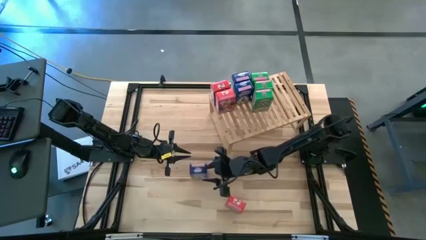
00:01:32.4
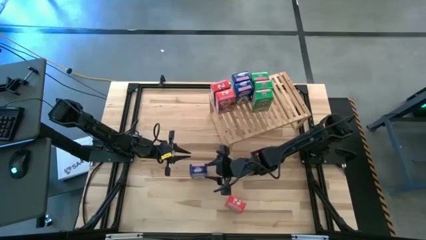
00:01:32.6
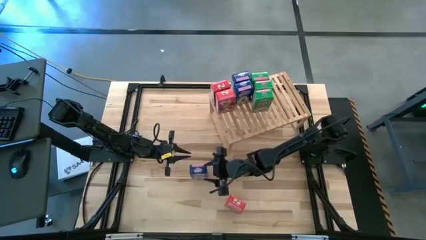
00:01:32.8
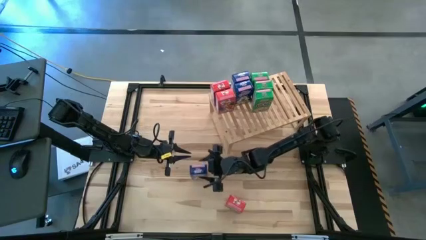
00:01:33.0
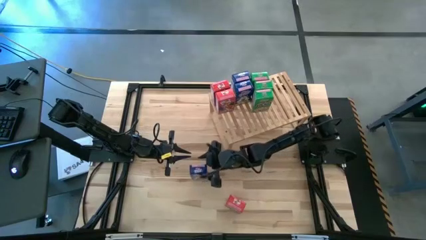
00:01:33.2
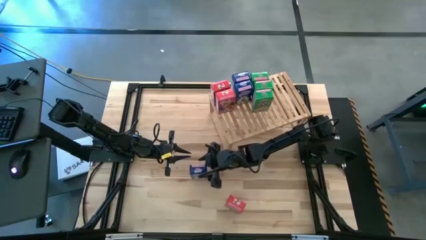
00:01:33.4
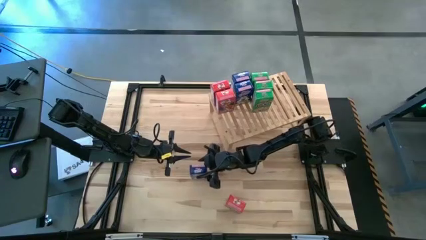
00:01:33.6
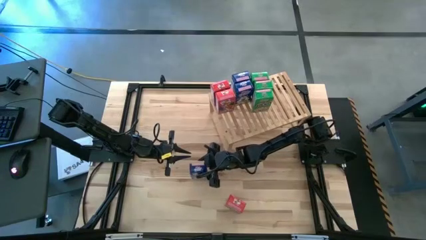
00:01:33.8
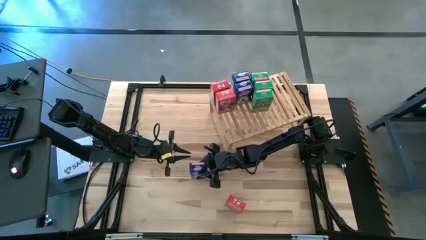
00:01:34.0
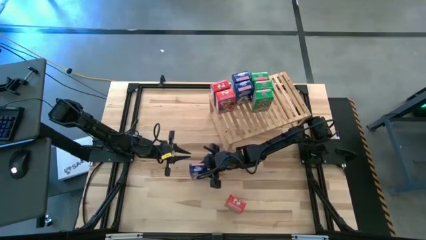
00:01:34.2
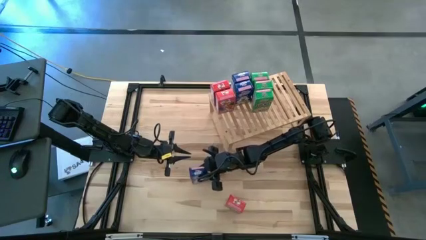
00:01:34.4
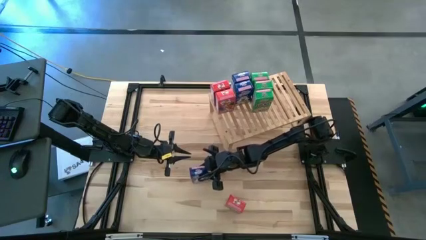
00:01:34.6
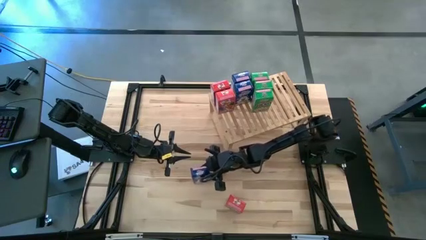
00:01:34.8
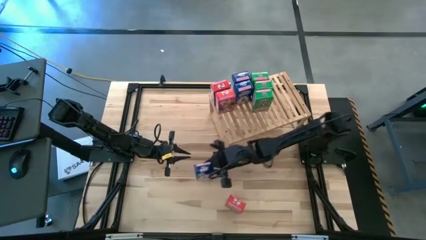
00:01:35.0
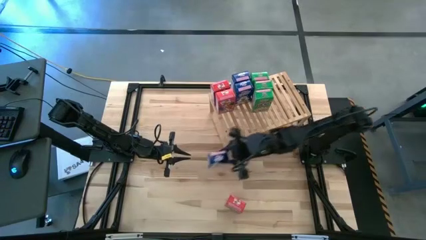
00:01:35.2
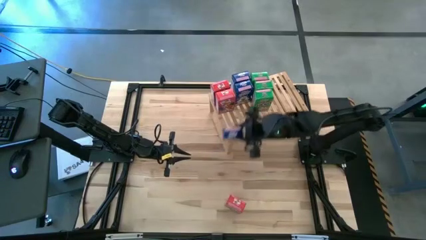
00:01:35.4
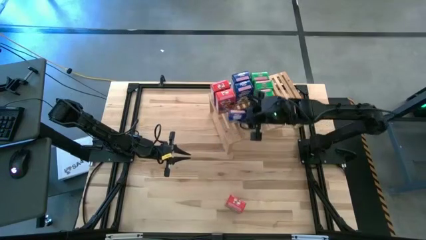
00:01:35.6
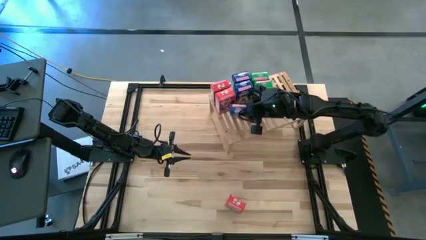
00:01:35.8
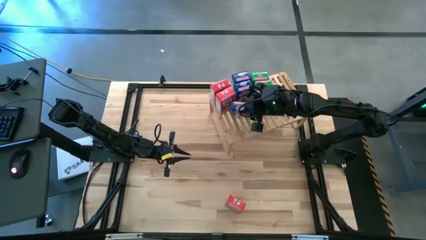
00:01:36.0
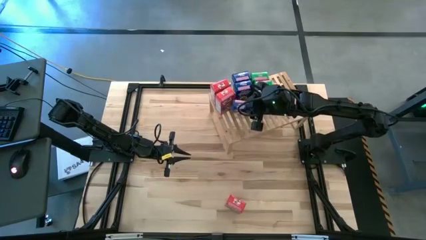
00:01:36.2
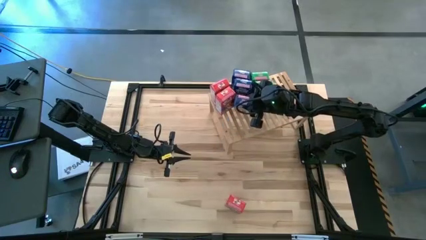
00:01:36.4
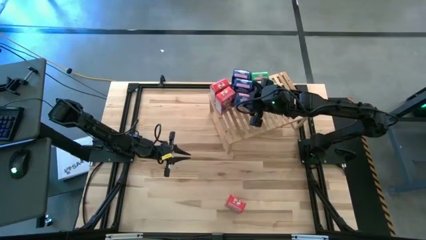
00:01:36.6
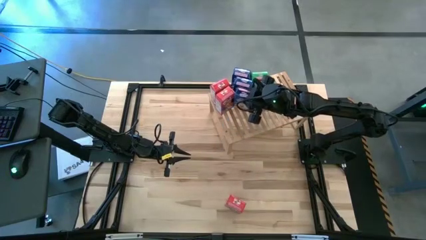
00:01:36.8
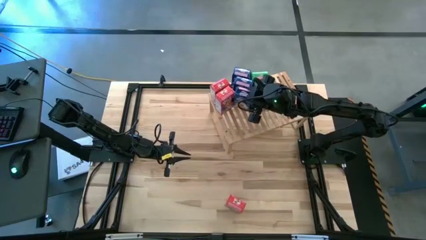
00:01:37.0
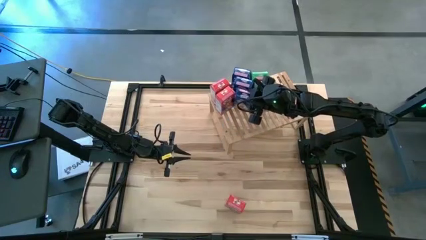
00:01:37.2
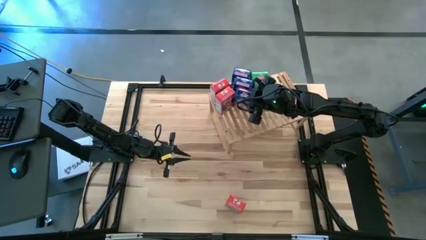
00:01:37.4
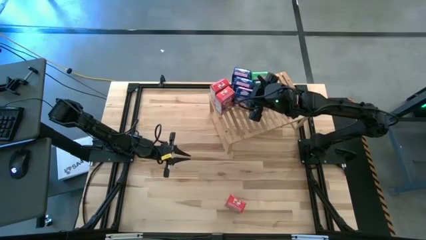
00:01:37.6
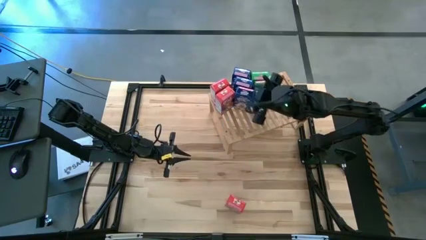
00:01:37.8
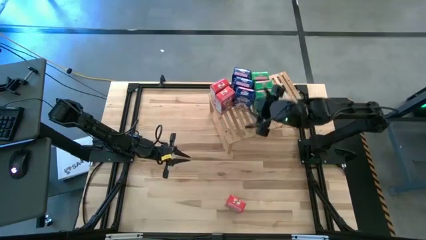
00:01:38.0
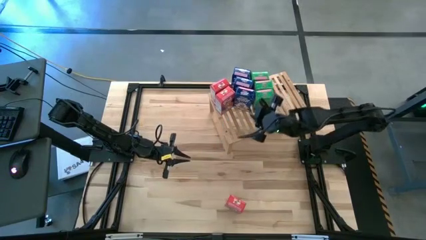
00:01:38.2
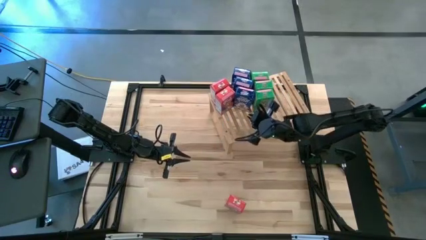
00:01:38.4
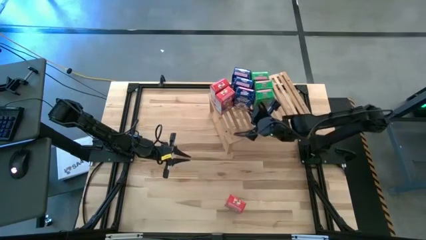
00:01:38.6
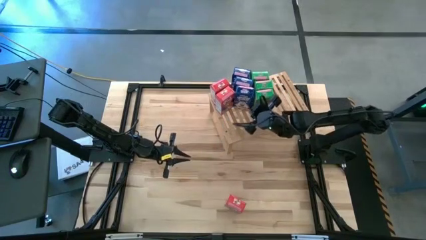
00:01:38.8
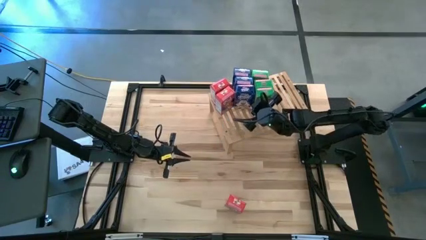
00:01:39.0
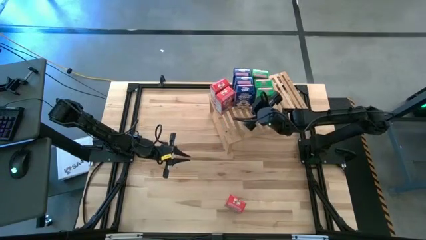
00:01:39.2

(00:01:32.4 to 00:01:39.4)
Task: Stack cereal on shelf
Put the blue cereal box on the shelf aligned with the other blue cereal boxes

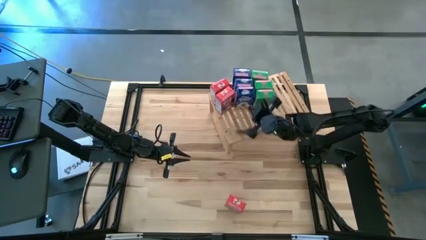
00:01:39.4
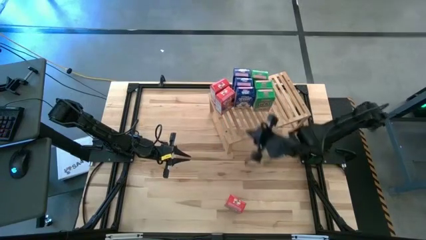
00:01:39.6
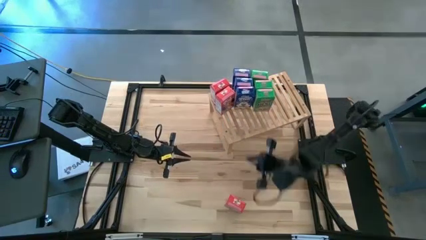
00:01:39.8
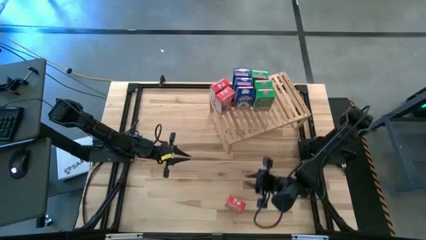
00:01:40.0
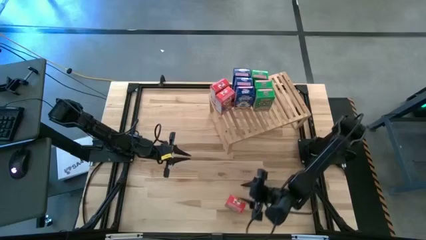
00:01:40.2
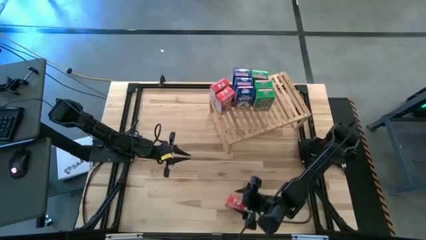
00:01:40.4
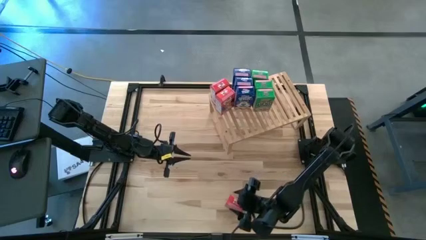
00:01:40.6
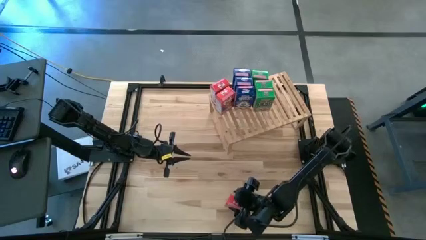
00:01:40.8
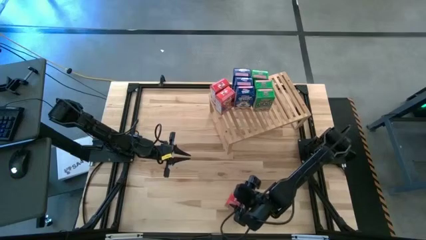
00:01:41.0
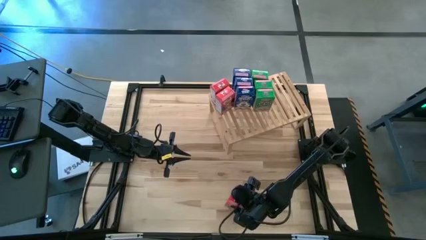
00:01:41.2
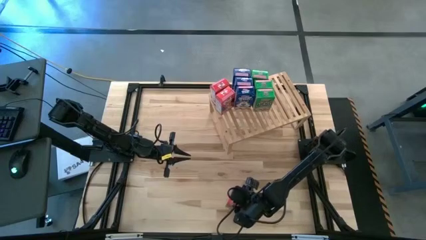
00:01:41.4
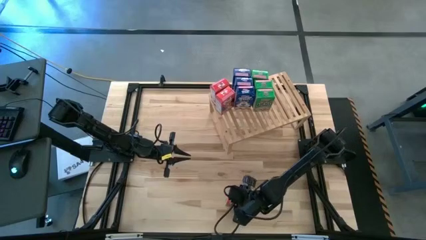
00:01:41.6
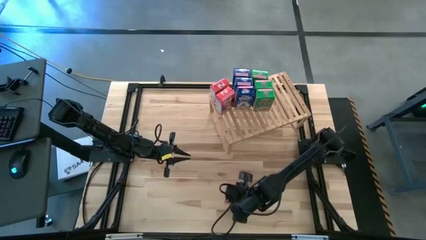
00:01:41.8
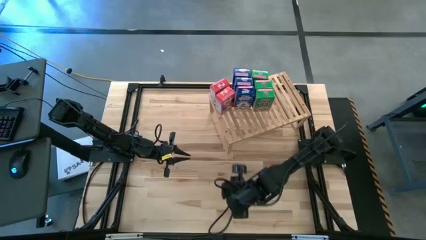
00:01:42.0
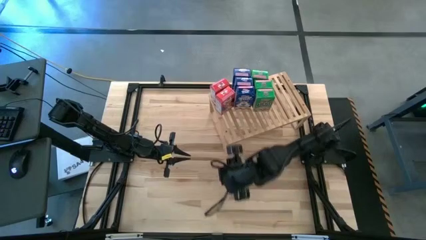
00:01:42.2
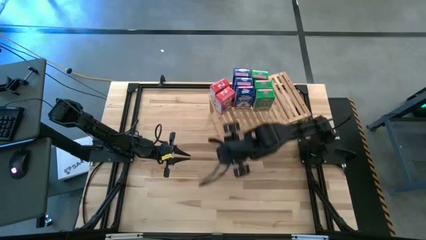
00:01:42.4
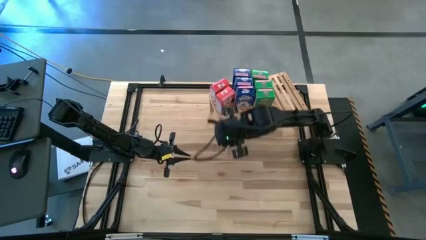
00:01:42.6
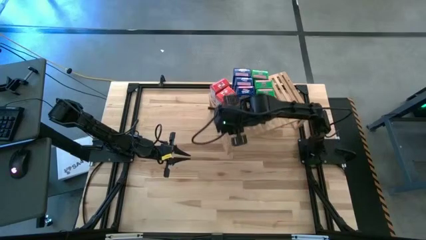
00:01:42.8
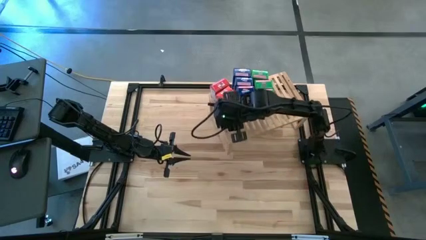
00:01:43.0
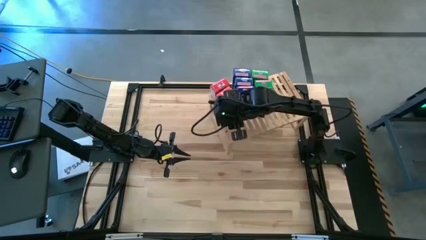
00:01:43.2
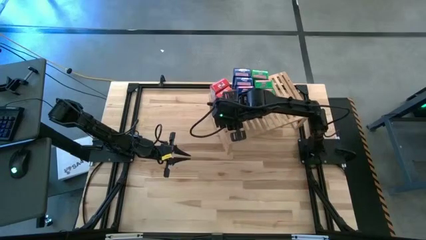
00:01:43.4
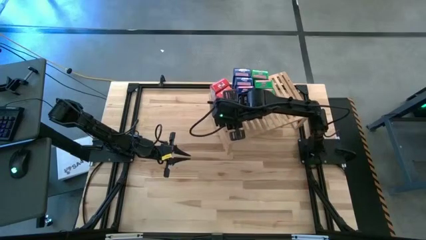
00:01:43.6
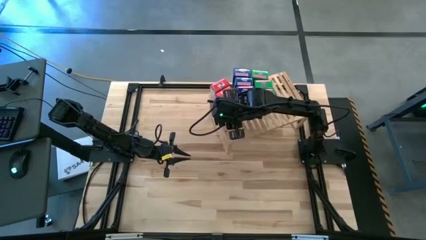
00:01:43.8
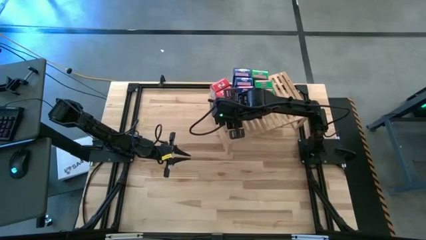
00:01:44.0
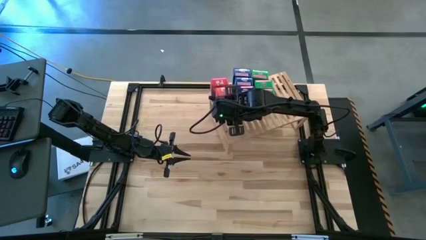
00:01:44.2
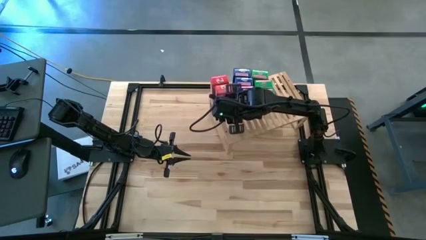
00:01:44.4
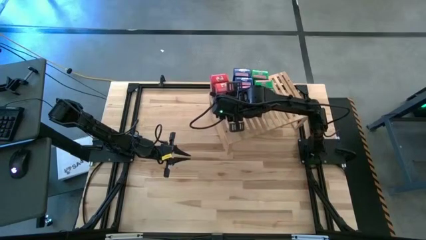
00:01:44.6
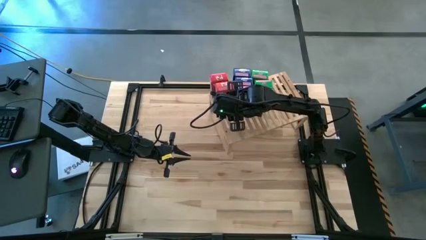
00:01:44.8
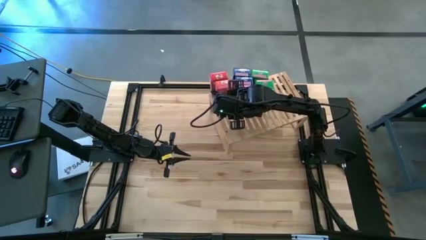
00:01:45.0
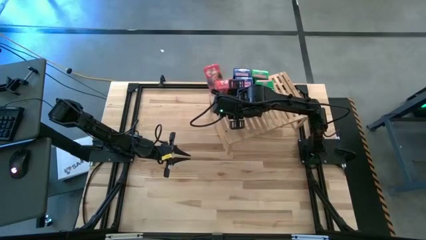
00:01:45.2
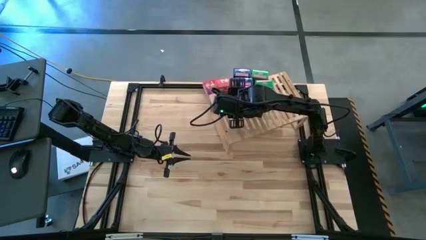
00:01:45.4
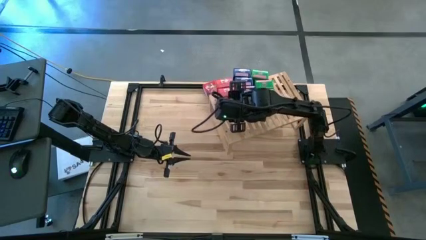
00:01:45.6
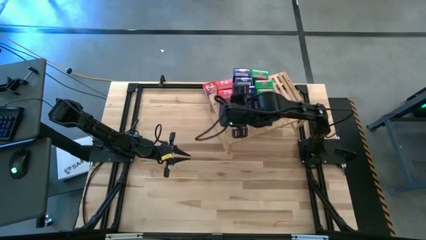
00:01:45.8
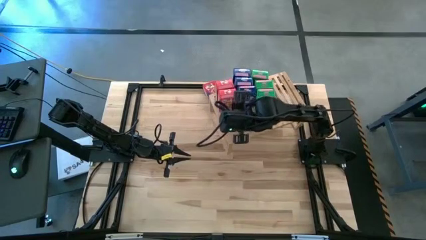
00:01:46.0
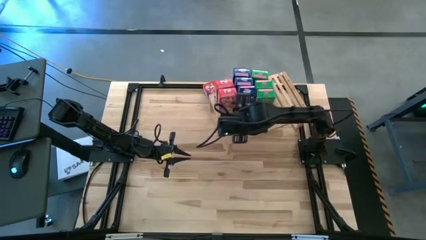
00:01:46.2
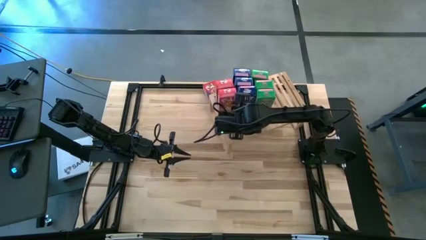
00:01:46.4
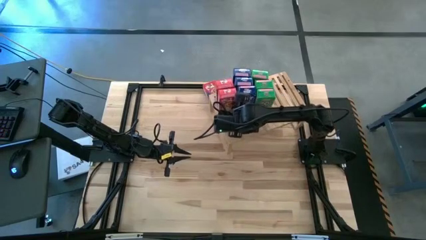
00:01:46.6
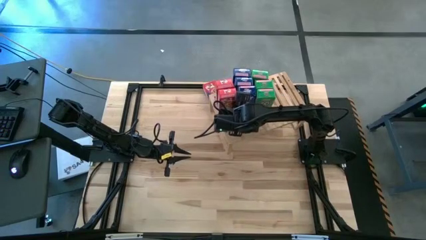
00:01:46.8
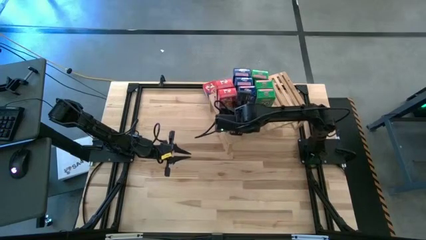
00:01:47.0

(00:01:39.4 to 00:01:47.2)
Put the red cereal box on the shelf aligned with the other red cereal boxes

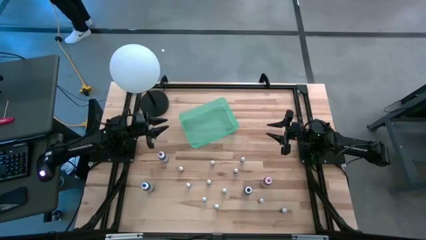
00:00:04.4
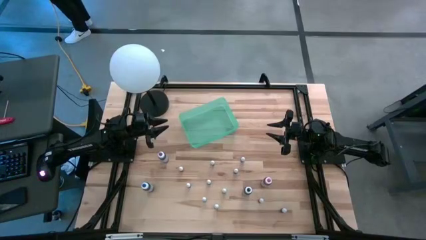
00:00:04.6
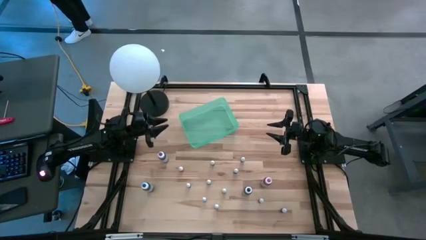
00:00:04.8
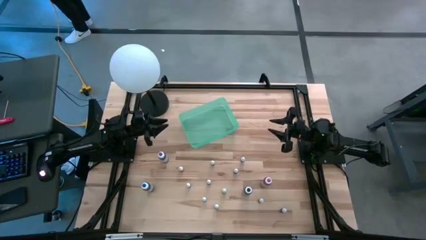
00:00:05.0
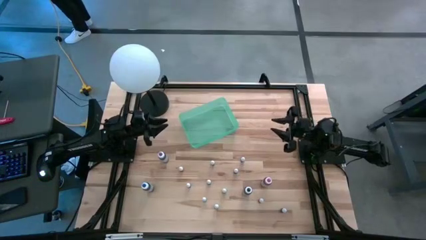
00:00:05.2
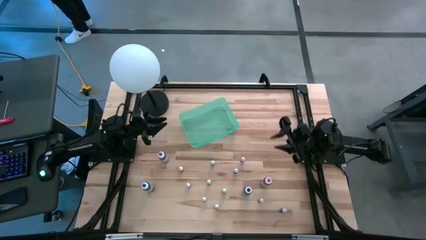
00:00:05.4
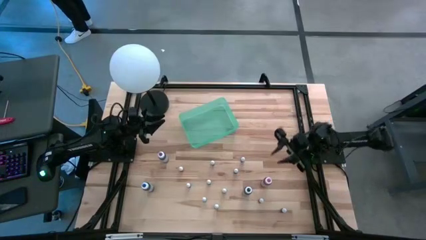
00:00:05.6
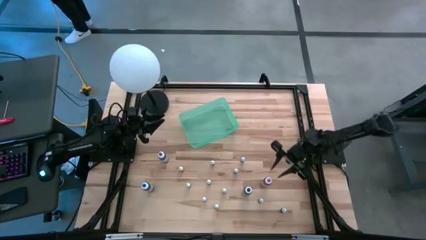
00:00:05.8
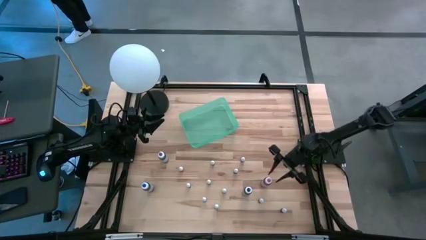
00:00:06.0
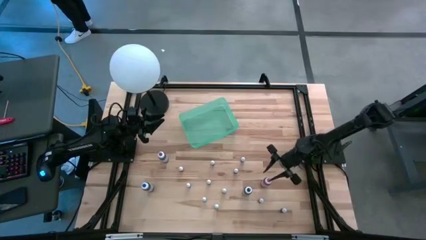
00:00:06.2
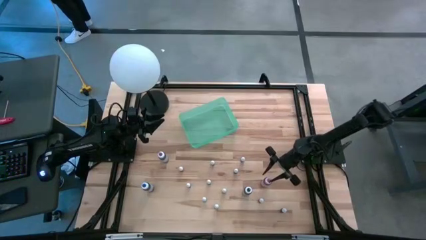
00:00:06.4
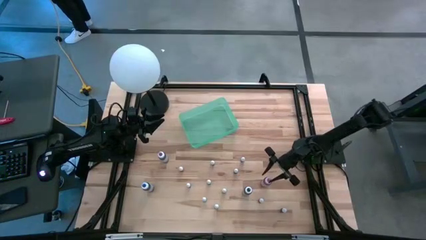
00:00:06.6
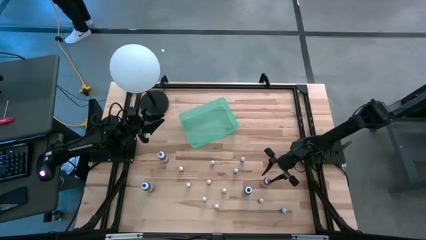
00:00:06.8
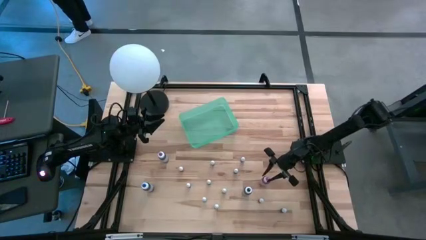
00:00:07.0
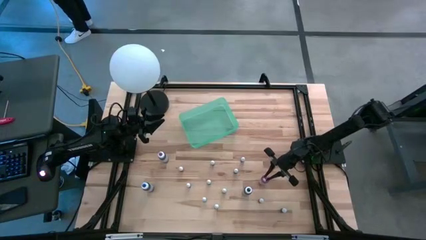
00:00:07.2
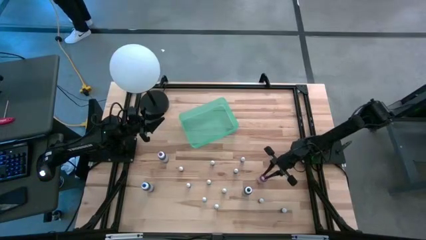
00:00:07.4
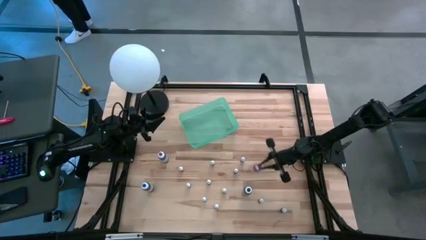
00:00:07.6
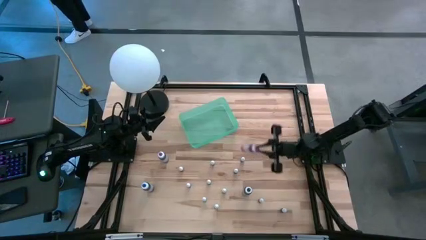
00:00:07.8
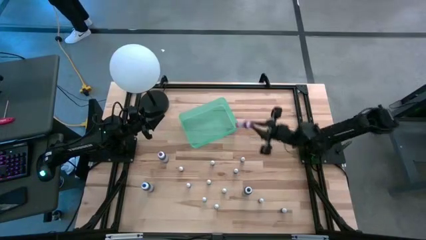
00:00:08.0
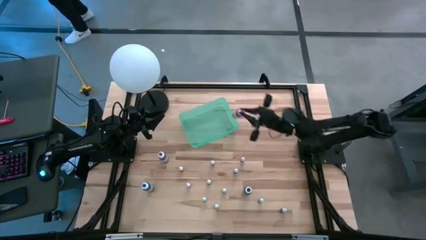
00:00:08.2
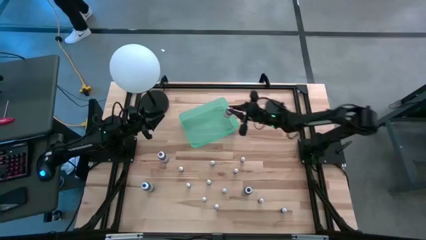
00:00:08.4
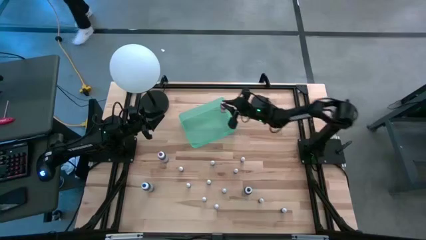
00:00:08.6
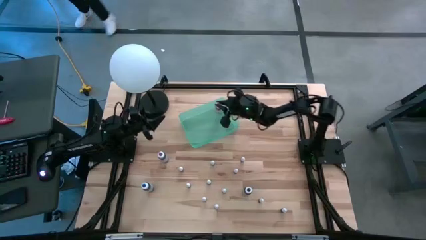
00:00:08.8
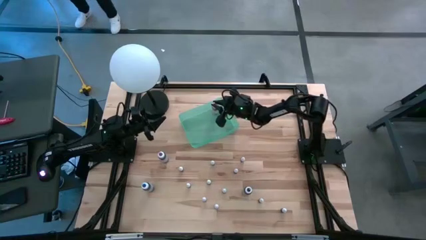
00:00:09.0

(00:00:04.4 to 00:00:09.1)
Task: Pick & Place food coloring
Put the large pink bottle into the blue bin
